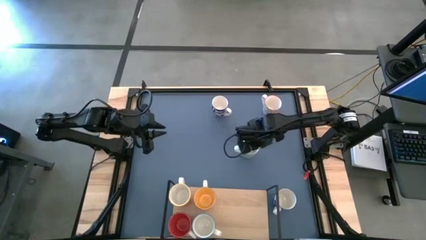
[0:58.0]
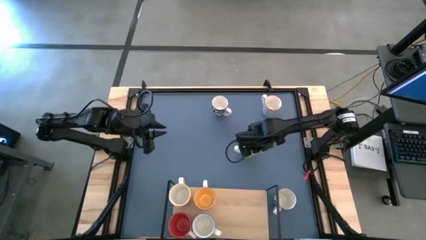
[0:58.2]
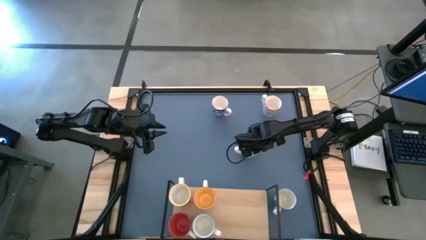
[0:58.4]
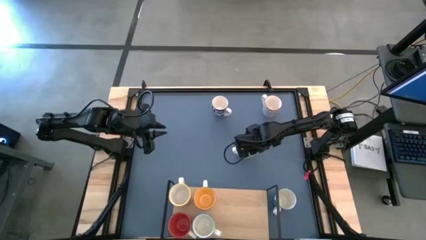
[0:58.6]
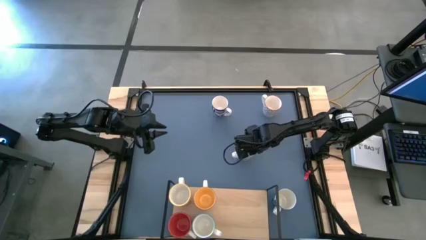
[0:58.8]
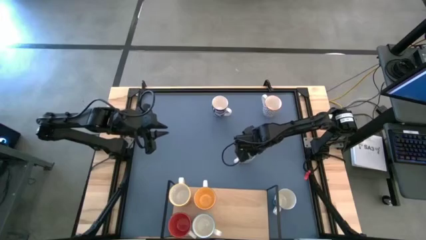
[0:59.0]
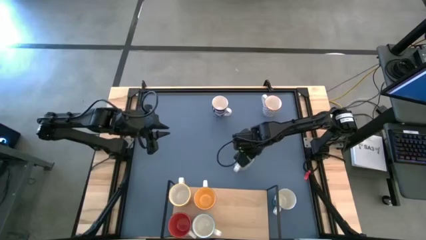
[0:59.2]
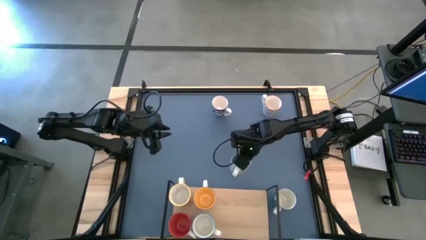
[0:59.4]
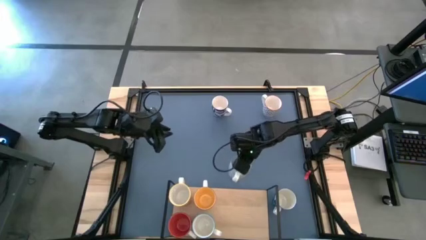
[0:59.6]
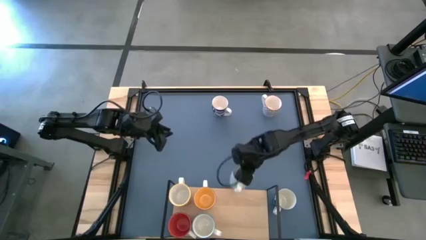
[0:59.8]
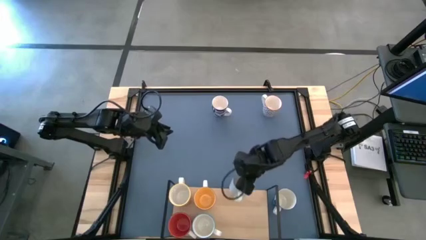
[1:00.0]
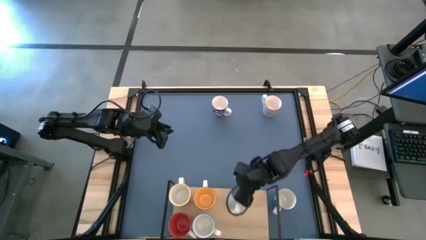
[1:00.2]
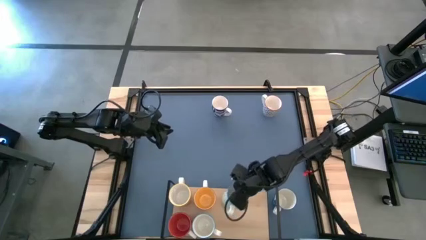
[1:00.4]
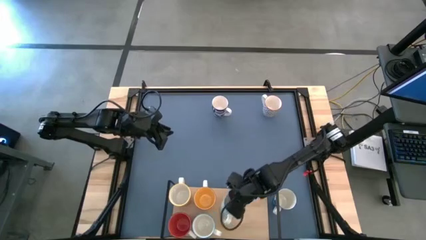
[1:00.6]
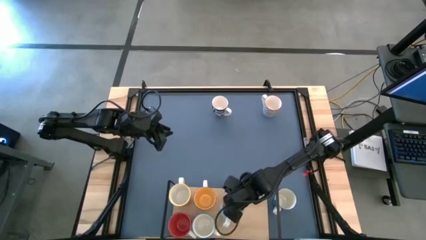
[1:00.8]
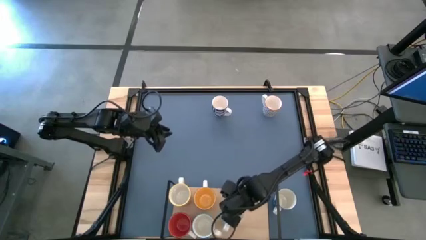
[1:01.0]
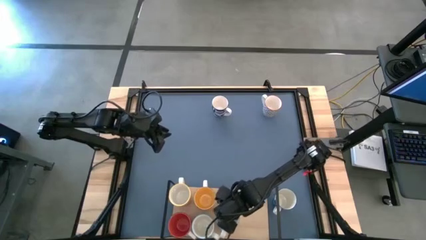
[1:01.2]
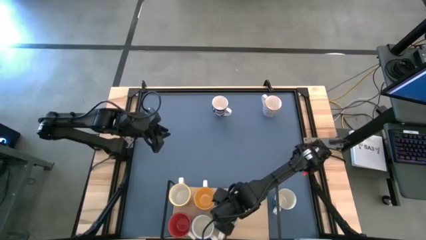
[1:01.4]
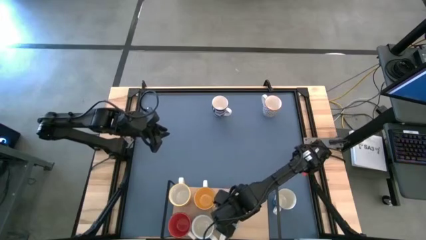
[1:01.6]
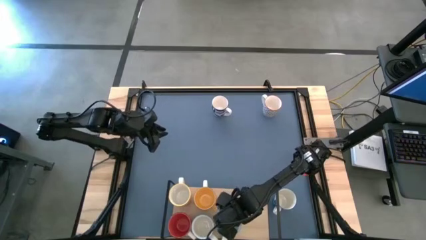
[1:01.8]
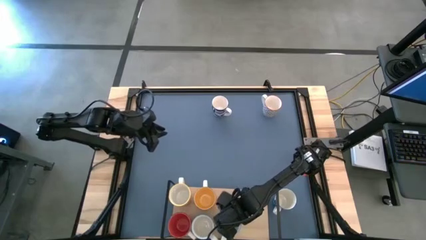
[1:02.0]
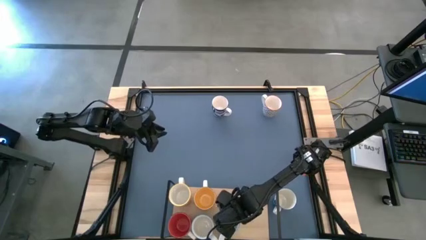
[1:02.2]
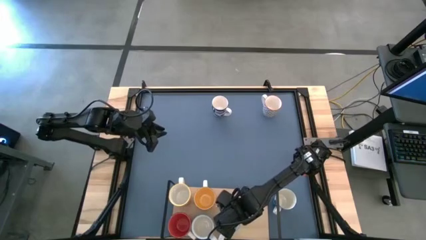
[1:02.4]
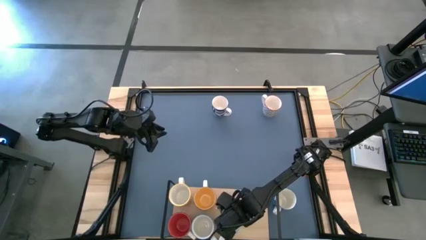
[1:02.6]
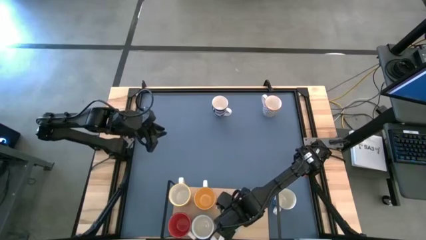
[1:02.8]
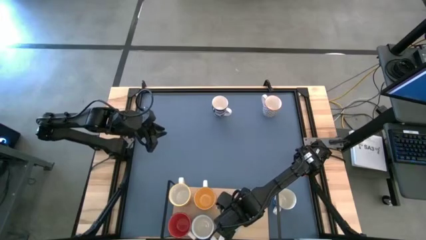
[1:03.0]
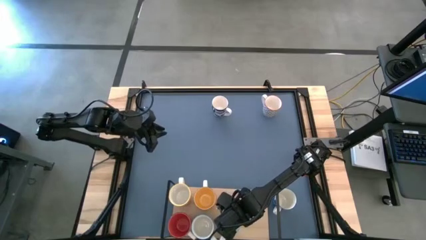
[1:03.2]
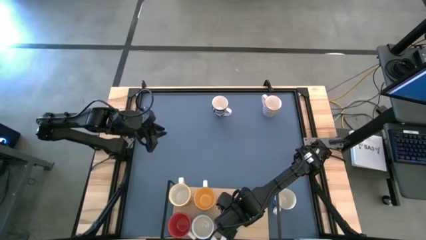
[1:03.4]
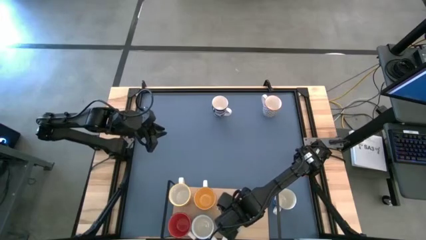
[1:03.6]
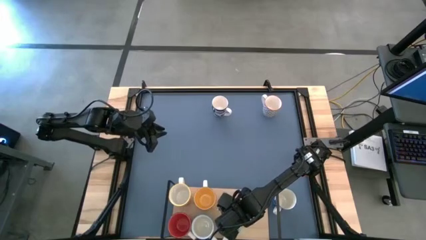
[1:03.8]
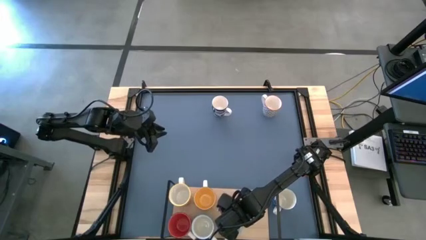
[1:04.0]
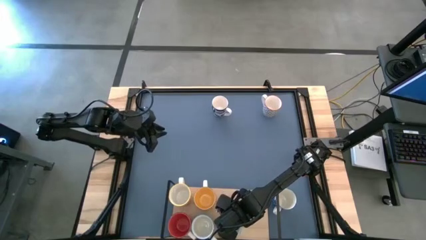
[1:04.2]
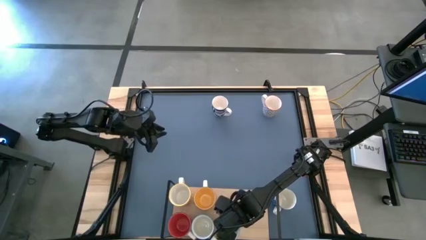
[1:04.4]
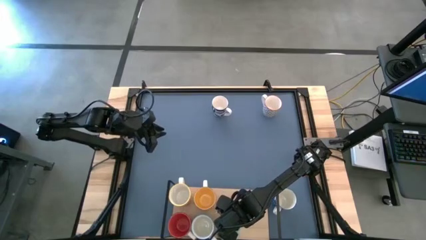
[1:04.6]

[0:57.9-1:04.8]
Task: Place coffee mugs
Put the light blue patterned mug on the shelf

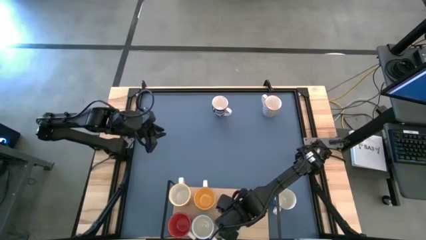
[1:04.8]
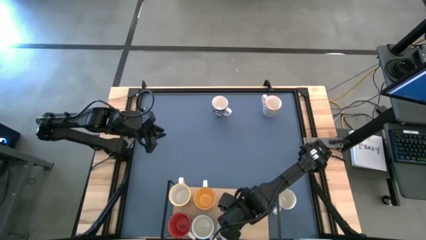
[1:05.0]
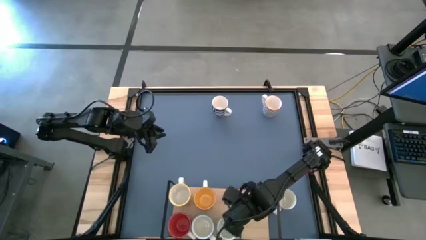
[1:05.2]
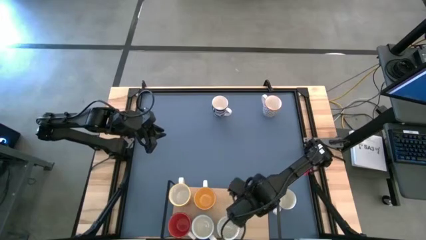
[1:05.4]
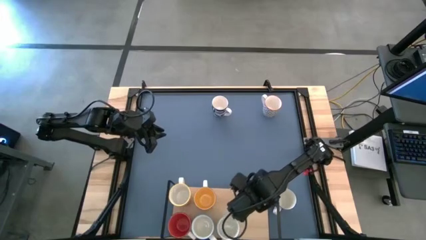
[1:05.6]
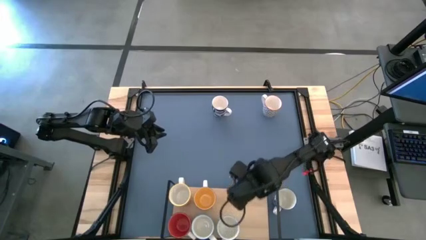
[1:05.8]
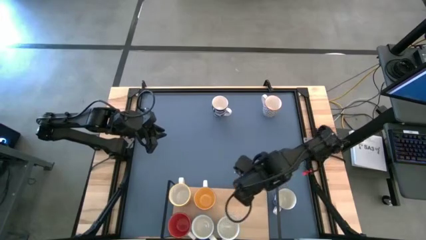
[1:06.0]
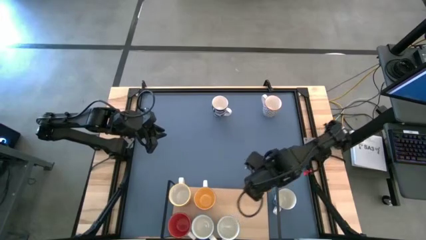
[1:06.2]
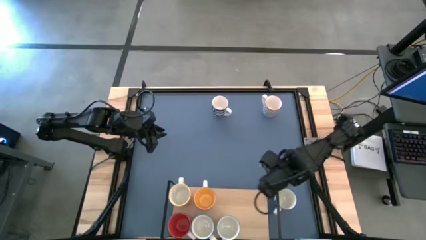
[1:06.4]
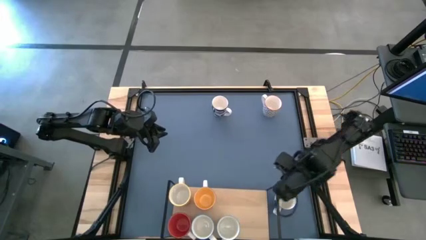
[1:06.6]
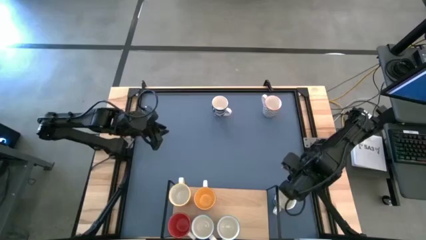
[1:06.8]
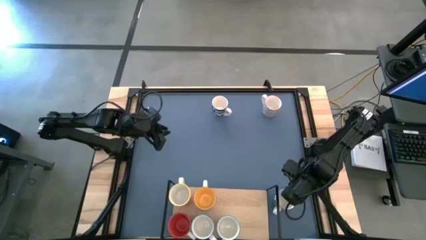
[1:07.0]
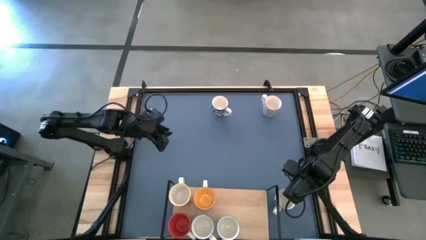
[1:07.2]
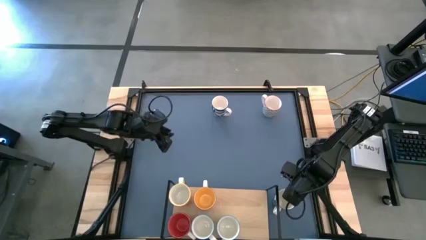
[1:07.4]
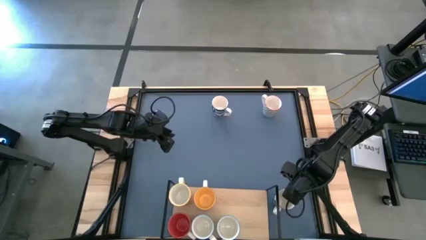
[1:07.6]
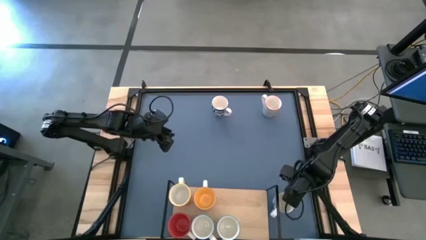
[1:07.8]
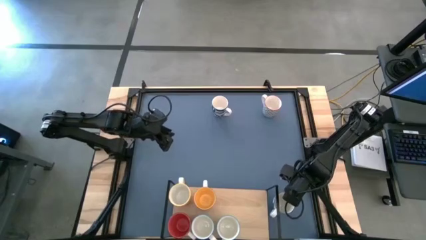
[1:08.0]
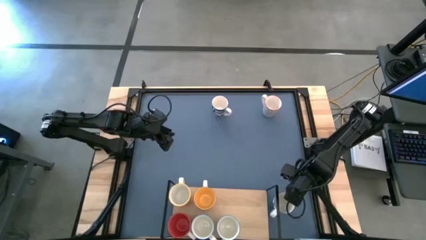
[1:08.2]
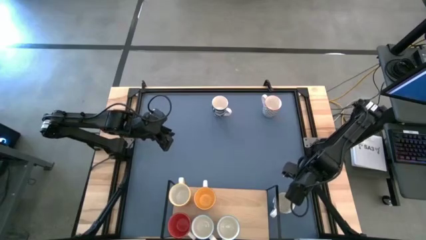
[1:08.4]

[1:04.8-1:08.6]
Put the blue flowered mug on the shelf

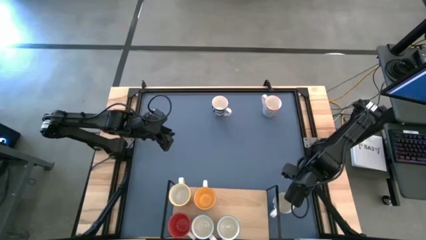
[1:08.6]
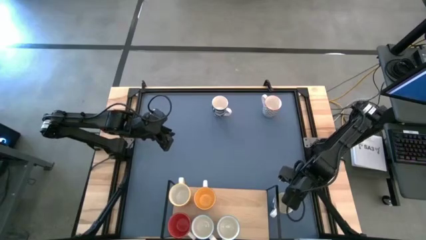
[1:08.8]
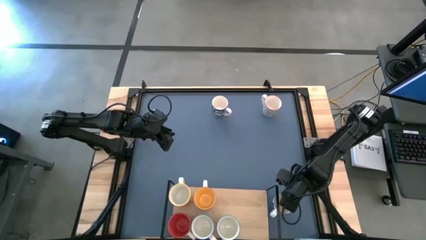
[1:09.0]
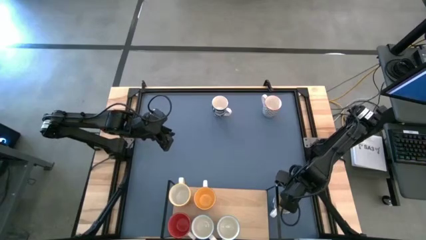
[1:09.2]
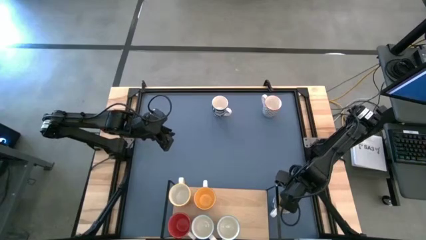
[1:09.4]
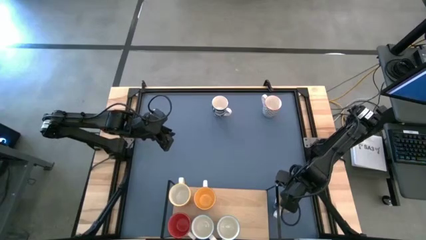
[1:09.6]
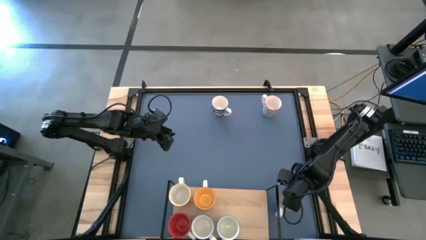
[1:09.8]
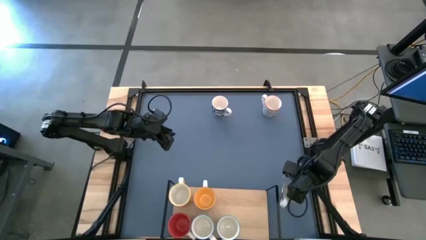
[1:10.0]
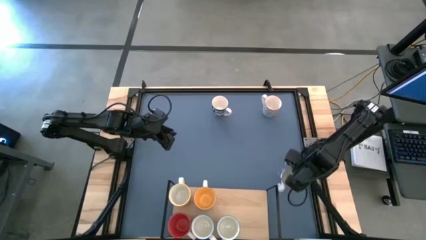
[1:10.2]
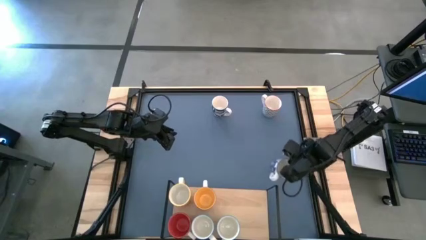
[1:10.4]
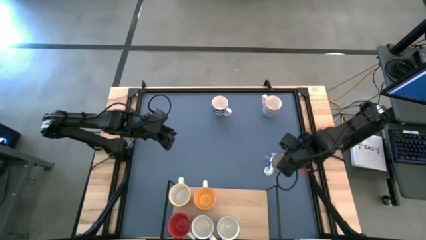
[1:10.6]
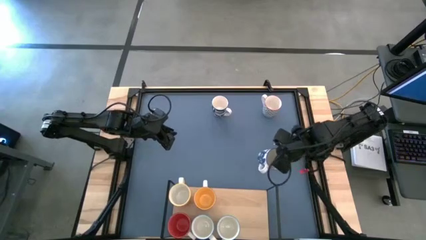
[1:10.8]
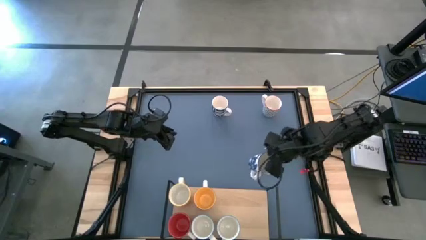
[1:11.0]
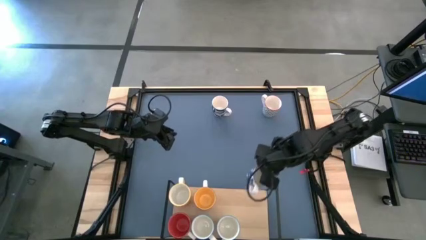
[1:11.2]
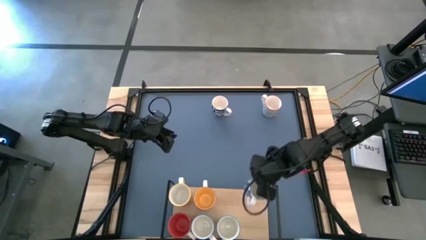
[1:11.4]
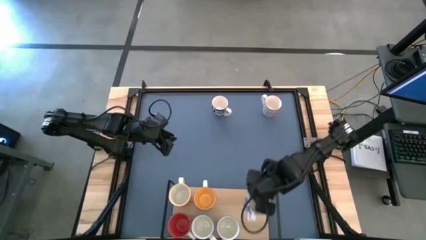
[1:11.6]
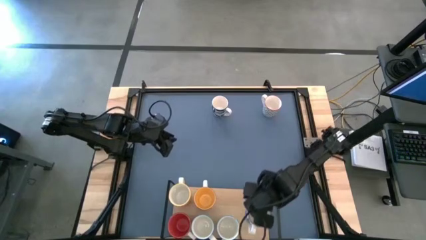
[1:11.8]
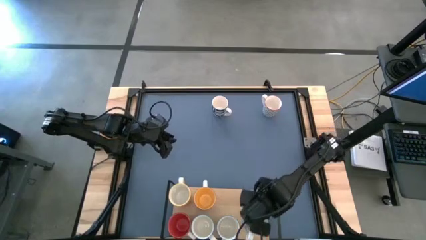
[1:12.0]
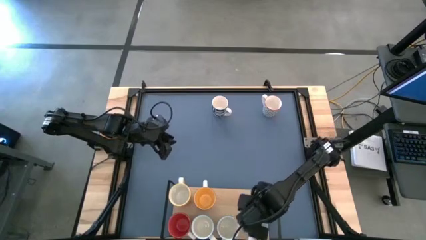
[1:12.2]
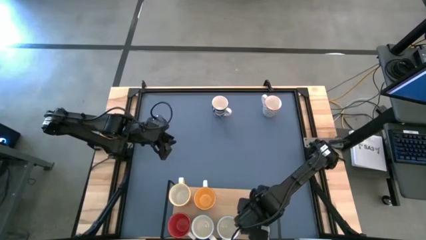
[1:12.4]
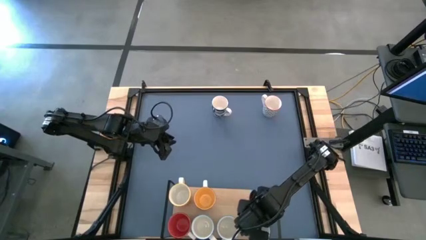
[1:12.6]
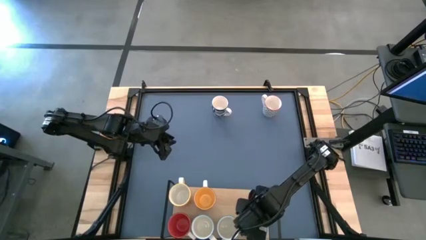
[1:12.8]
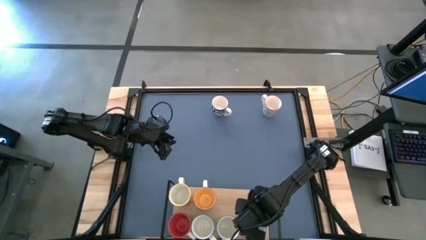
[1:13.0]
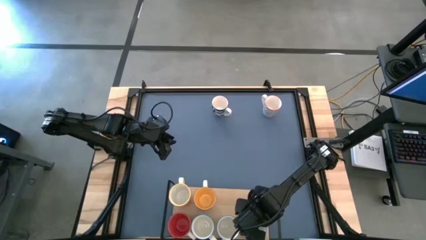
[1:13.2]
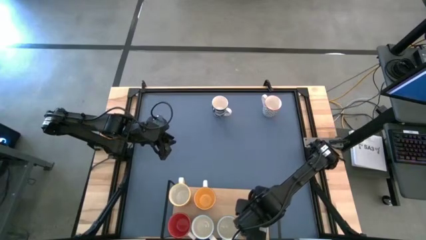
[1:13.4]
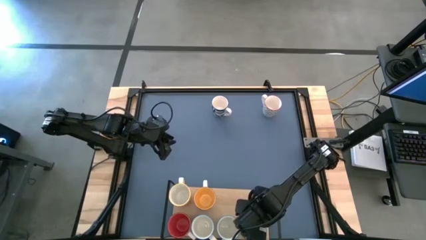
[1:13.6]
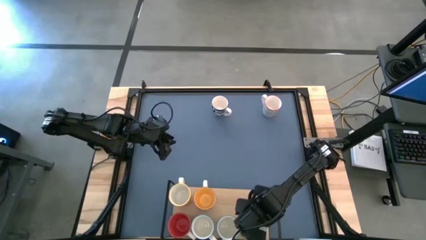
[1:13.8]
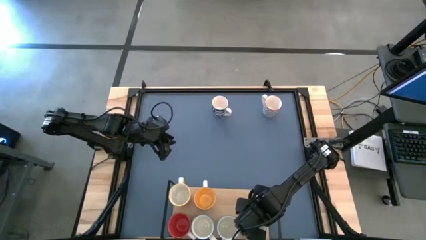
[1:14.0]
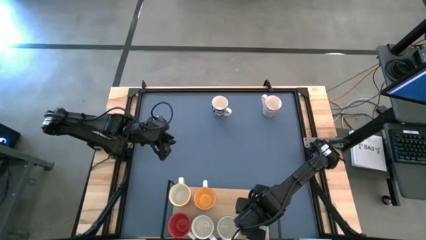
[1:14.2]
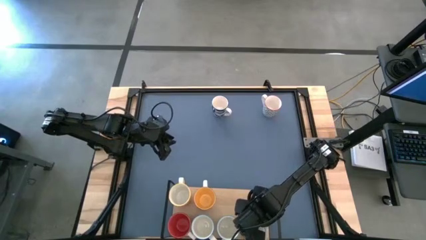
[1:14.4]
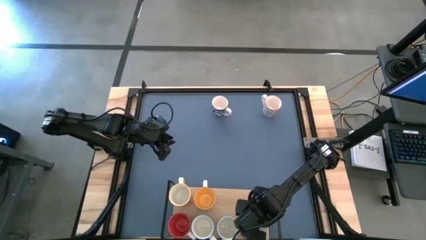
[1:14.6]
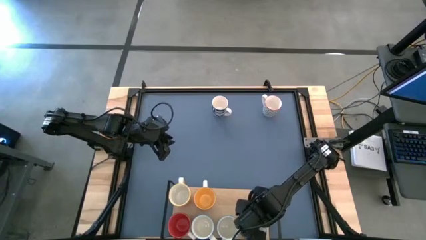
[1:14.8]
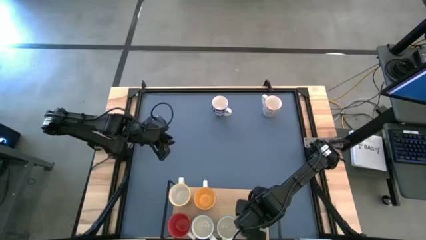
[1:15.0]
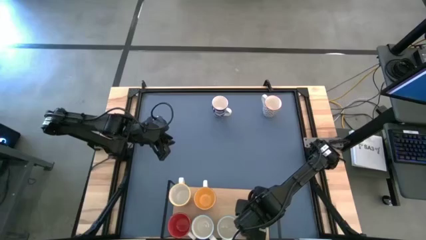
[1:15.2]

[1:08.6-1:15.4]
Put the blue flowered mug on the shelf
